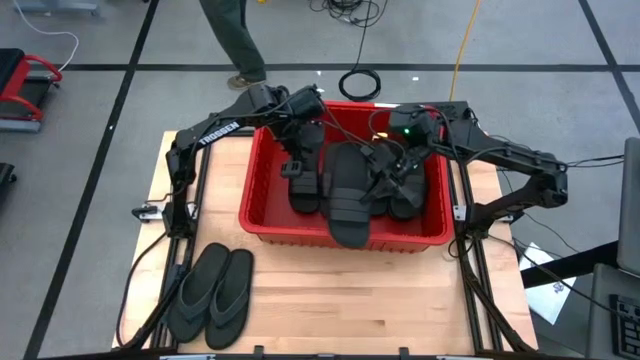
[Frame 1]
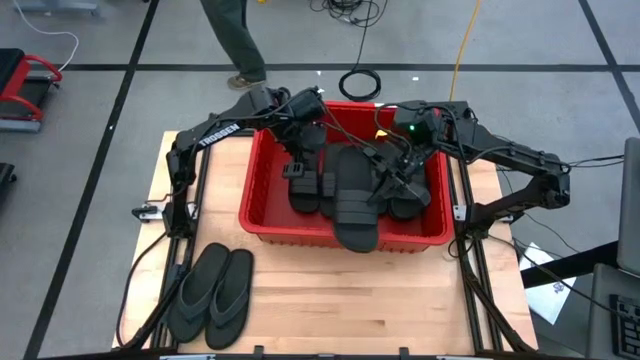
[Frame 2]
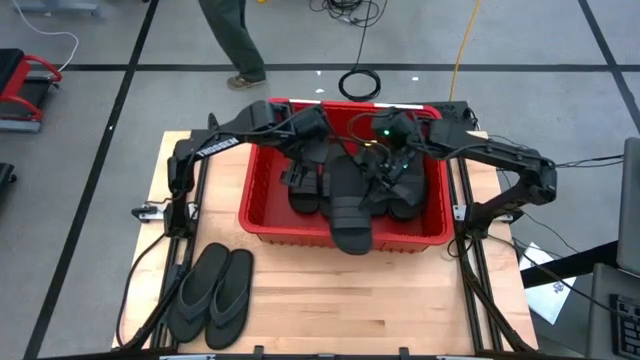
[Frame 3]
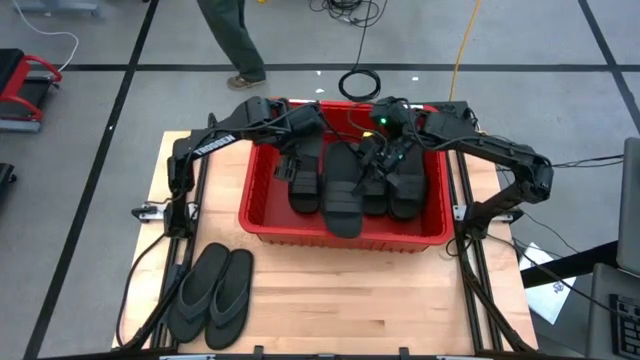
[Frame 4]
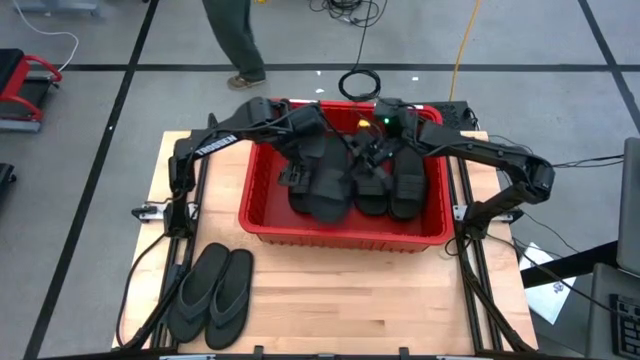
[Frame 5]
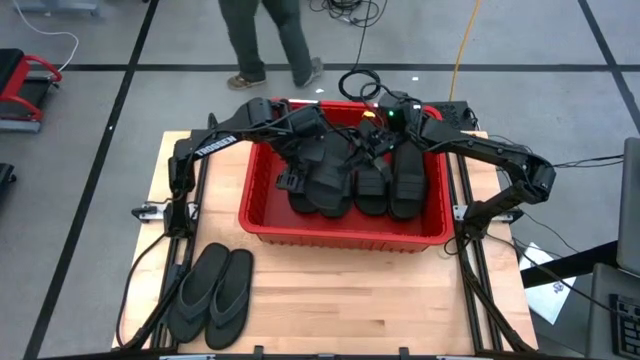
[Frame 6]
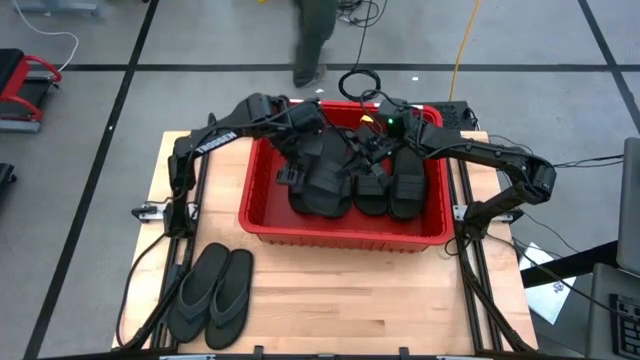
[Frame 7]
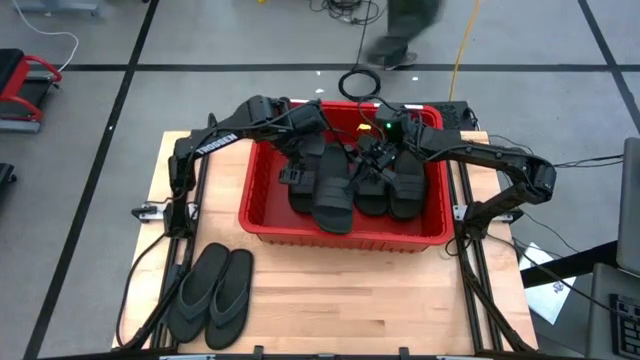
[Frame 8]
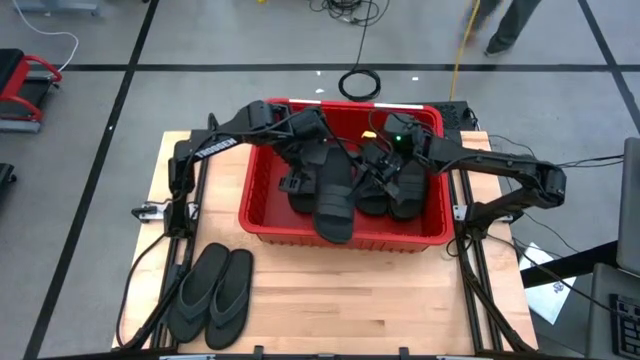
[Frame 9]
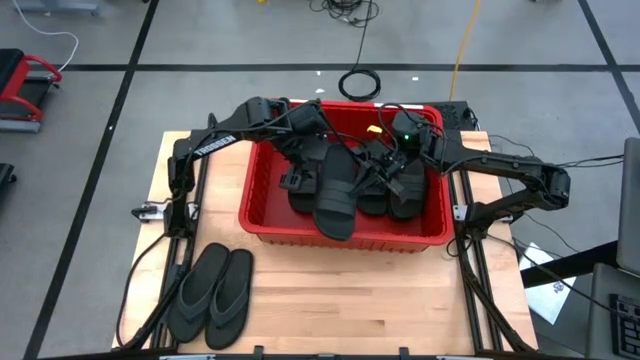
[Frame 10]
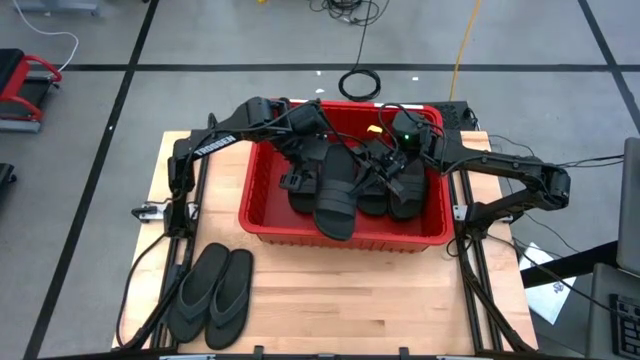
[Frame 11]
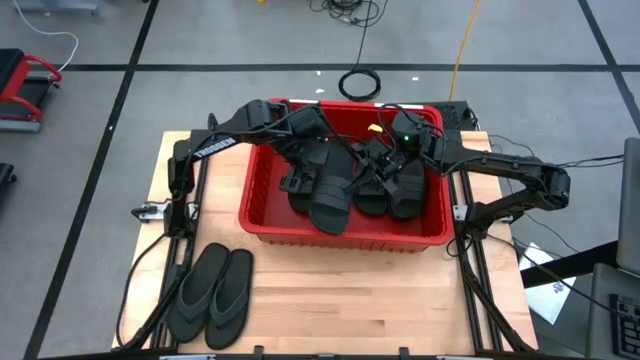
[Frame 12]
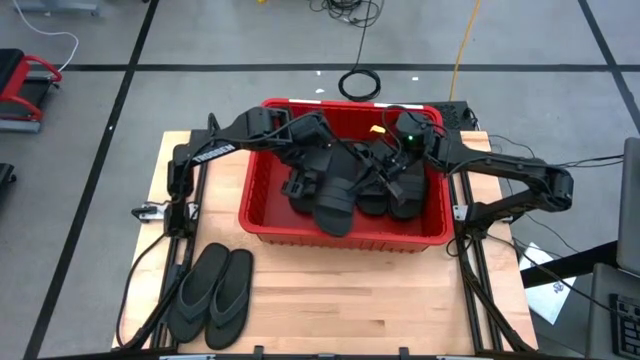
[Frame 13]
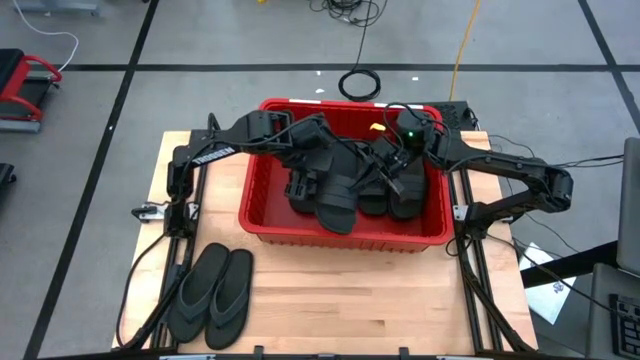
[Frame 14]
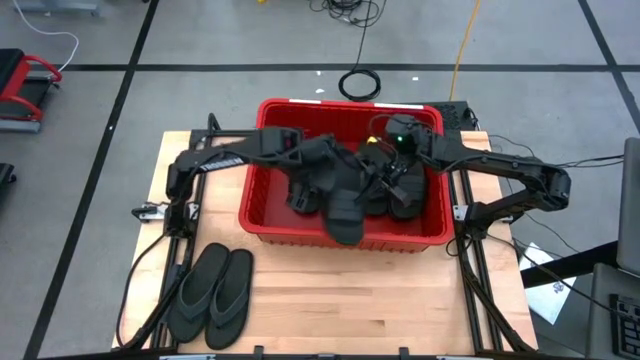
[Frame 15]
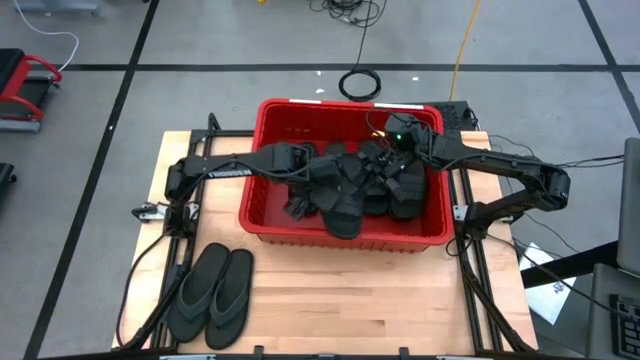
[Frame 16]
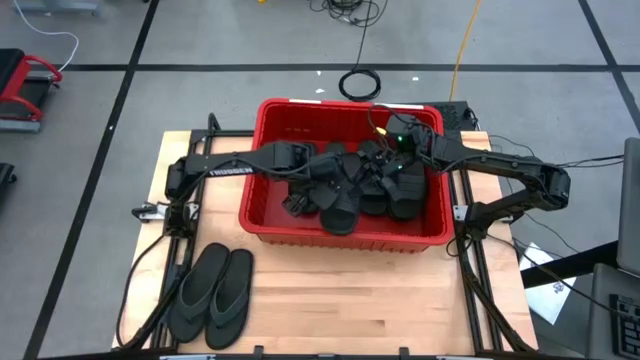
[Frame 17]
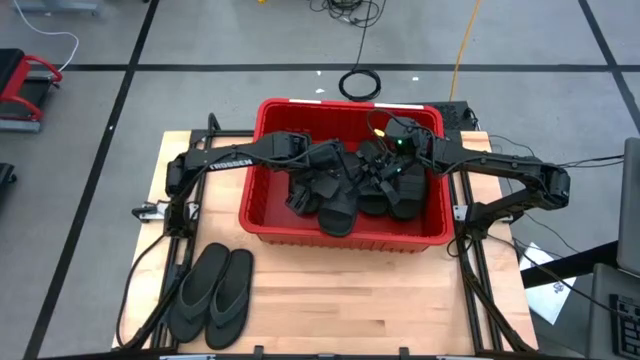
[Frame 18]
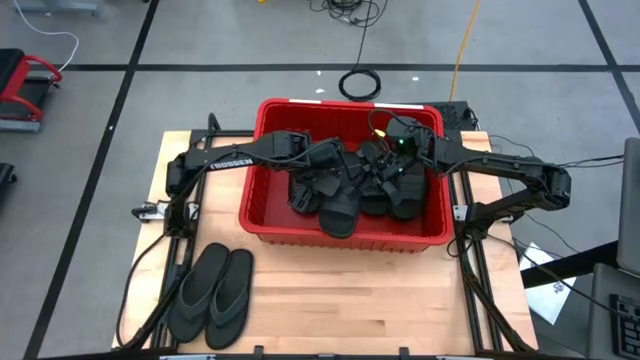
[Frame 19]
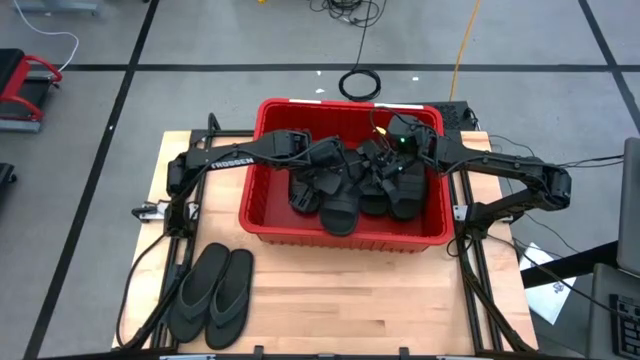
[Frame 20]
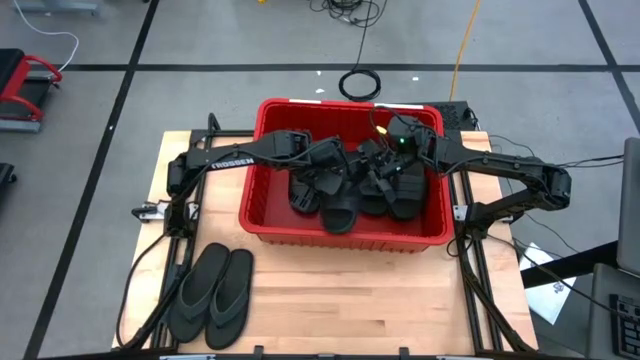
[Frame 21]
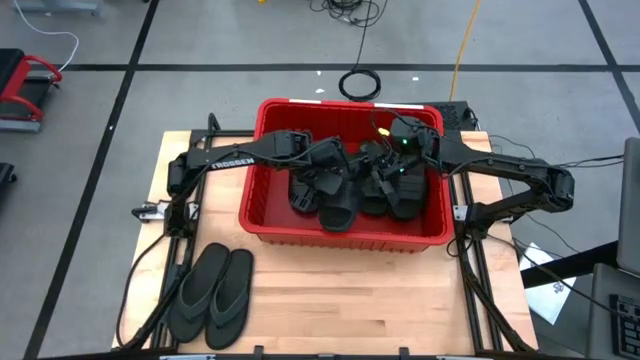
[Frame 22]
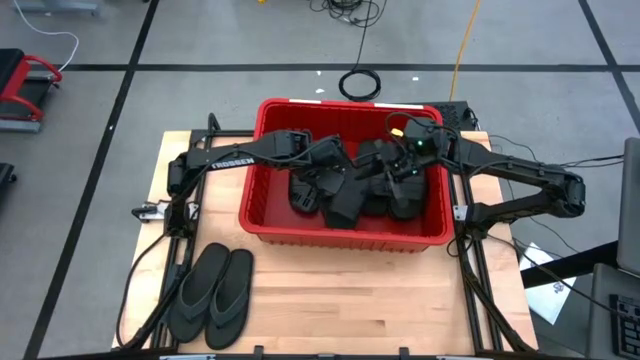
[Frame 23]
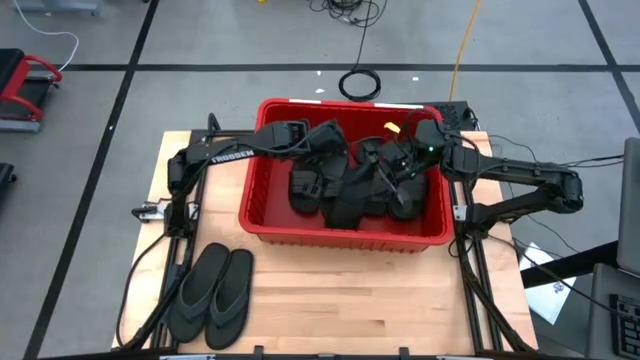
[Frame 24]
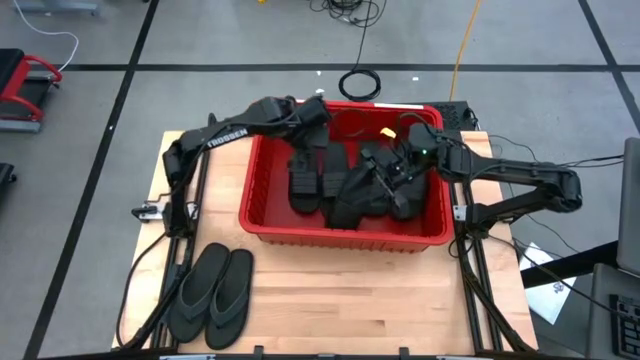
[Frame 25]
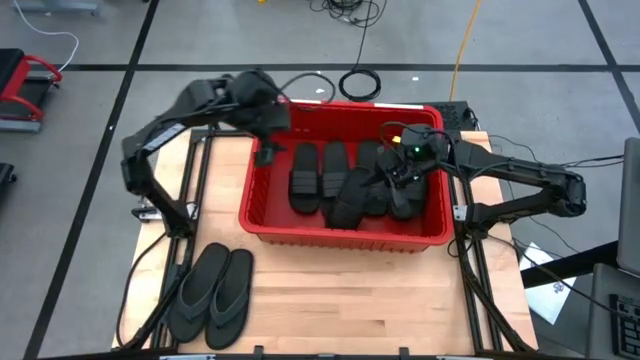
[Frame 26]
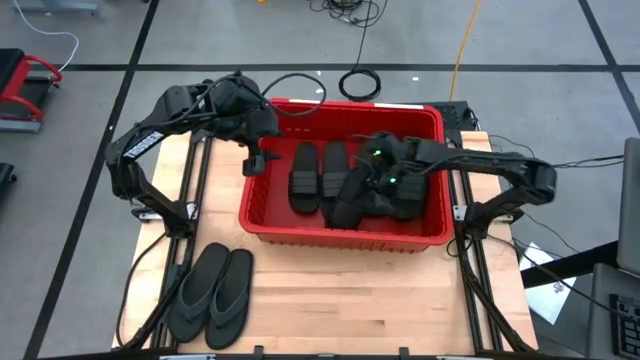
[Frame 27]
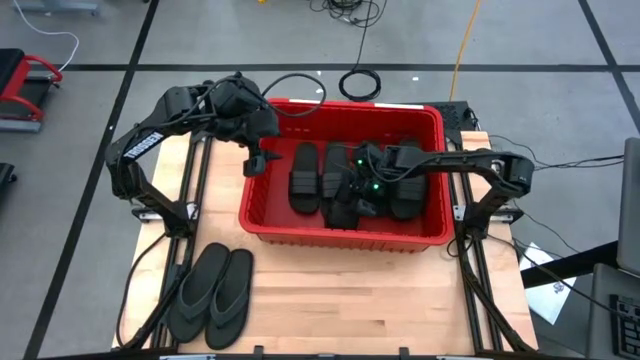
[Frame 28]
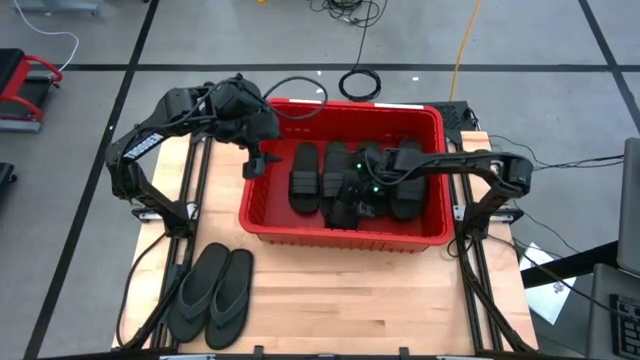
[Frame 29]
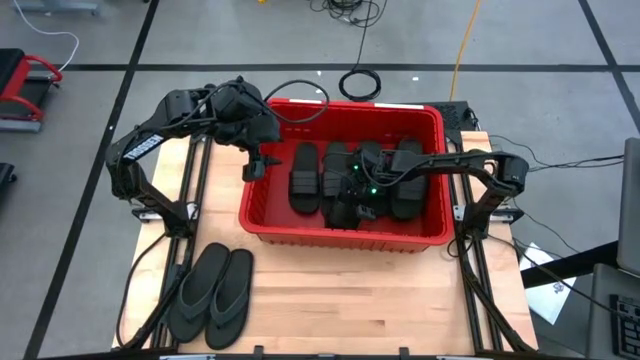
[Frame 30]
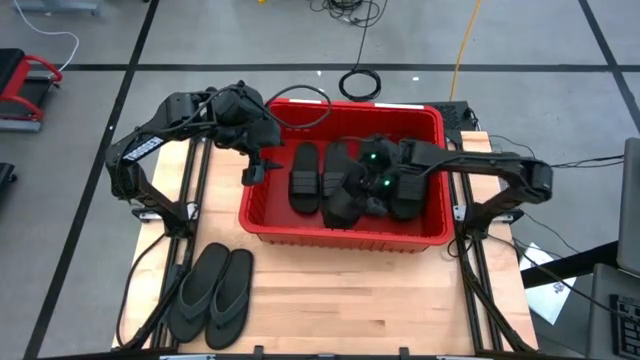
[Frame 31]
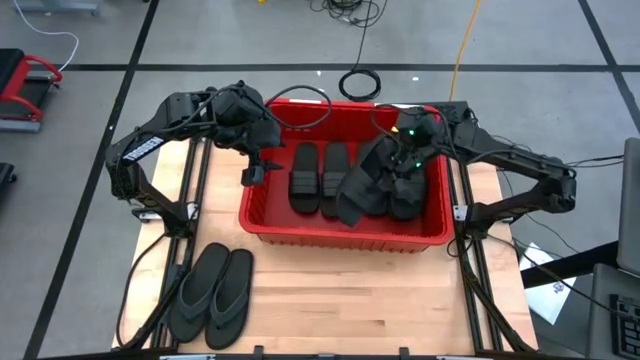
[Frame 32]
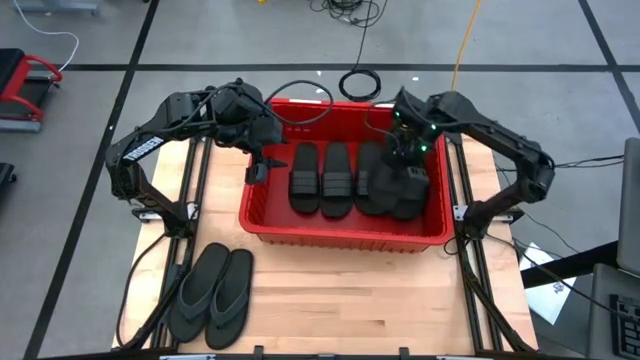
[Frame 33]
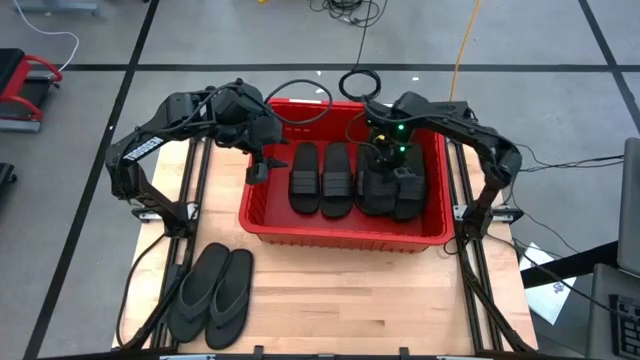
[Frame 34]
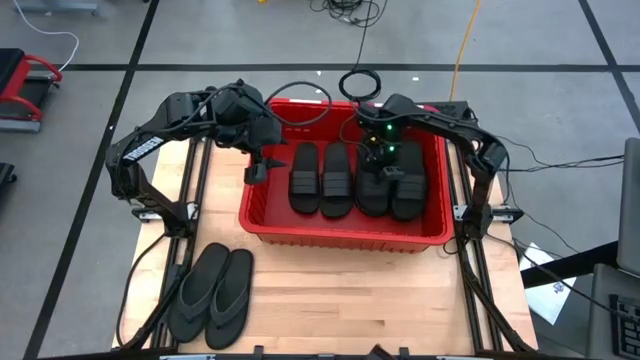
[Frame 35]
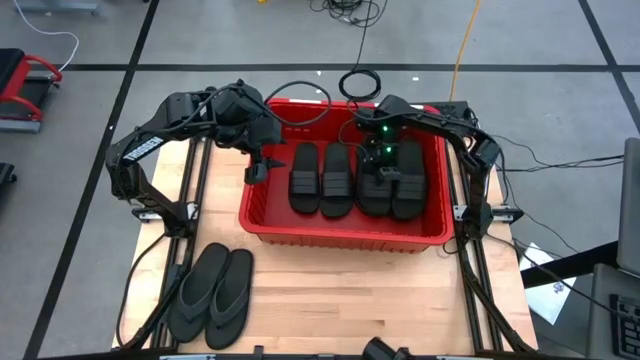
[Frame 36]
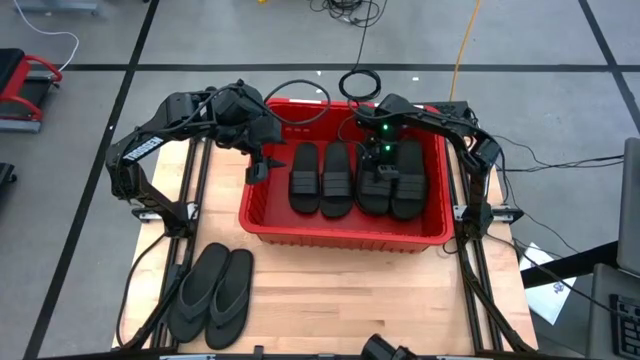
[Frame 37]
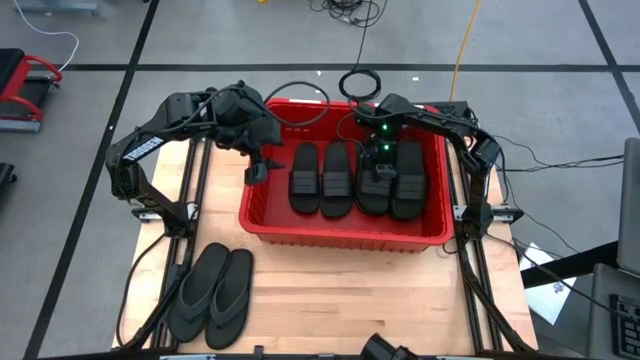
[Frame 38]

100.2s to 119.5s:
Task: Pick and place slides into bin
Put the black slipper into the red organizer bin

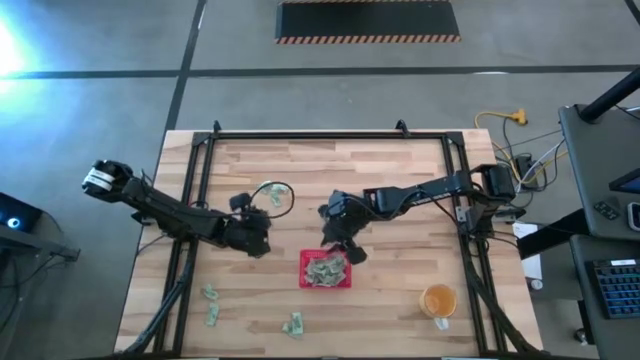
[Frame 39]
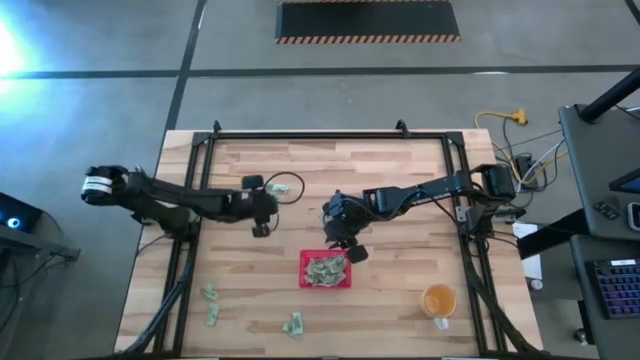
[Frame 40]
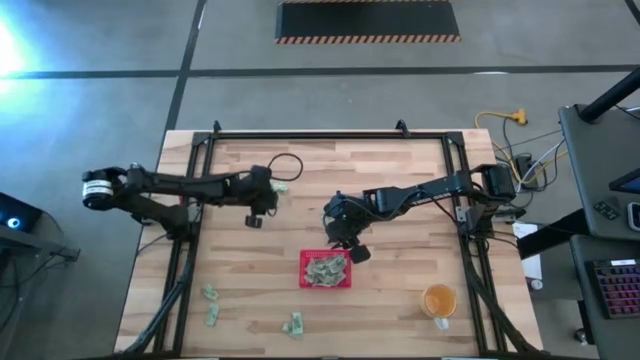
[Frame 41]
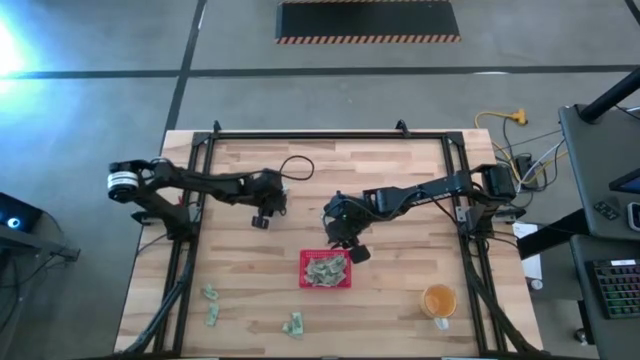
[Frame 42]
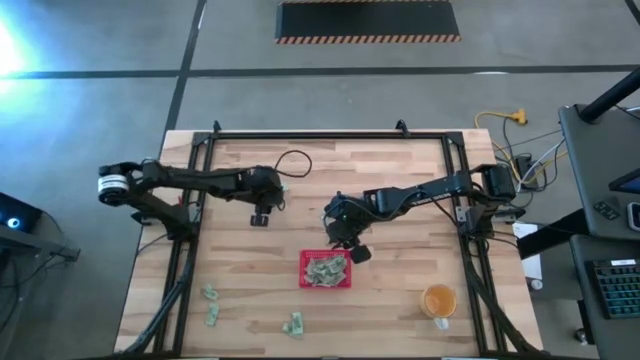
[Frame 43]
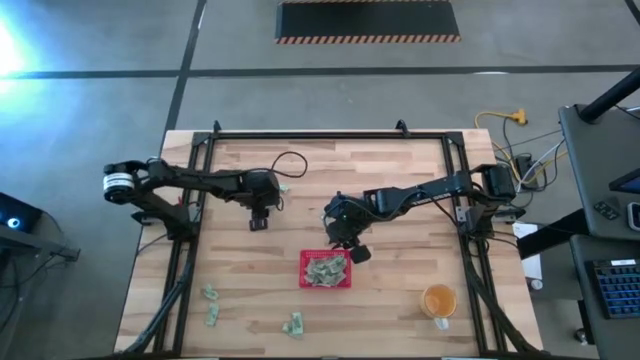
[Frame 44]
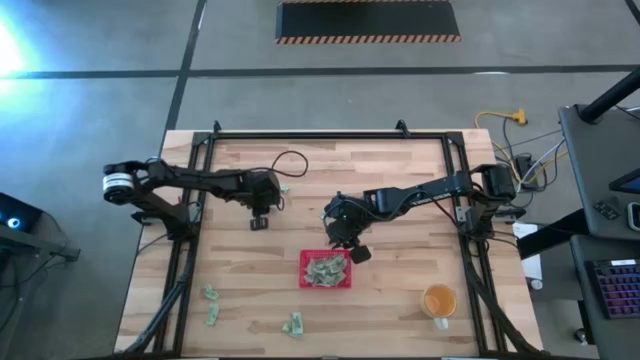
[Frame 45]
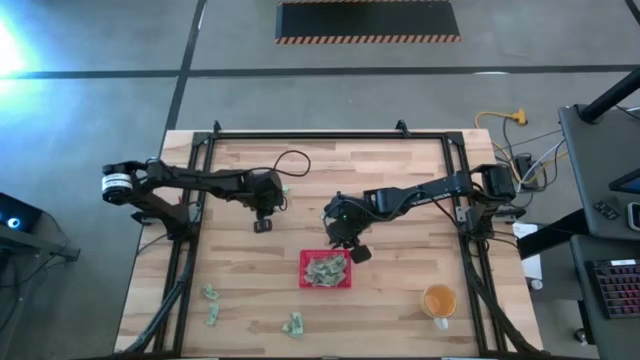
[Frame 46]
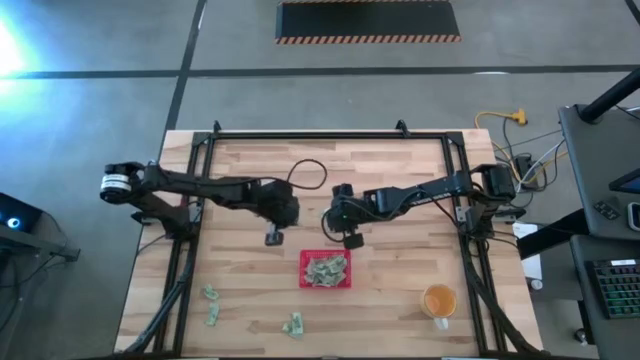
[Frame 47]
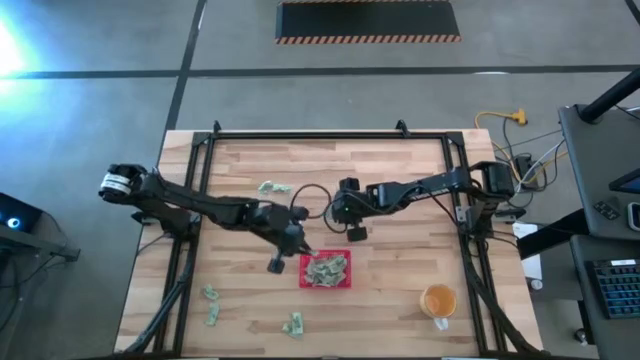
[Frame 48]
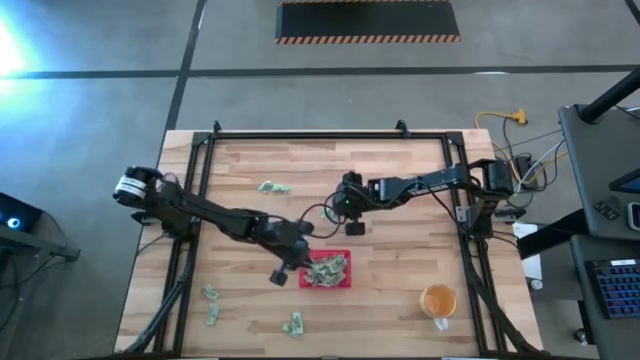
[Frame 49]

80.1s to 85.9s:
Task: Pick and place Stevia / Truvia into bins
Put the white stevia packet into the red bin
